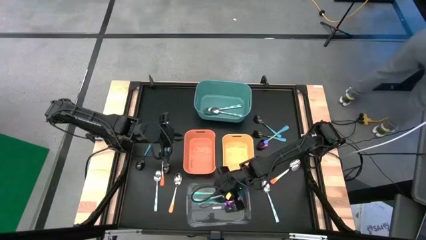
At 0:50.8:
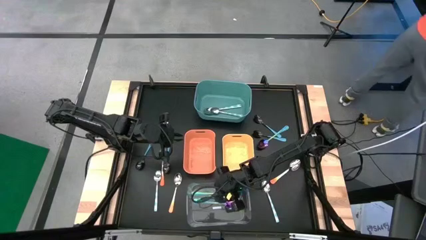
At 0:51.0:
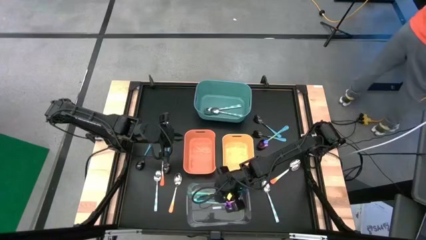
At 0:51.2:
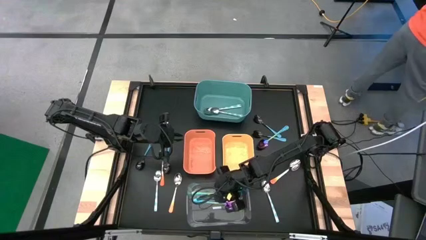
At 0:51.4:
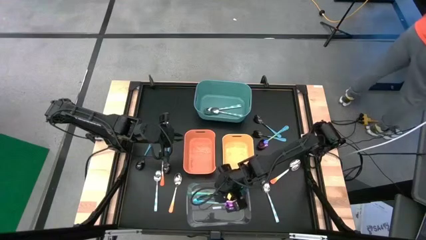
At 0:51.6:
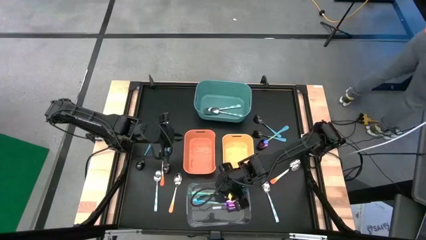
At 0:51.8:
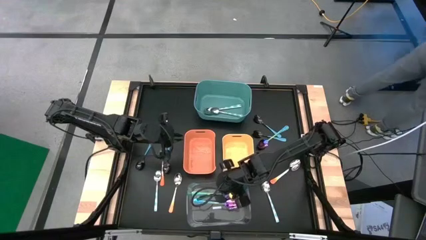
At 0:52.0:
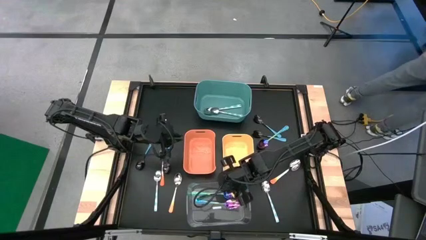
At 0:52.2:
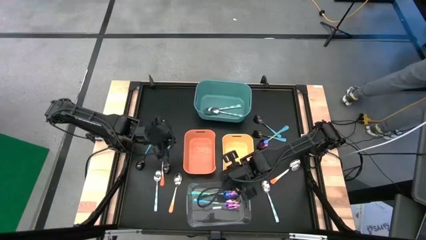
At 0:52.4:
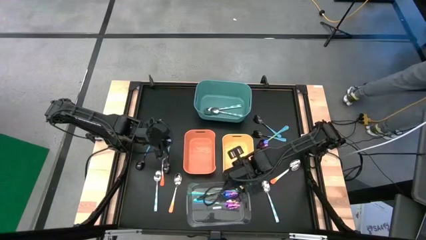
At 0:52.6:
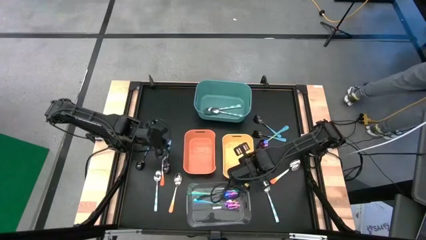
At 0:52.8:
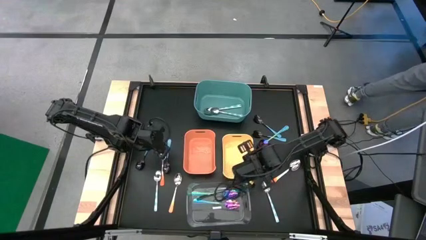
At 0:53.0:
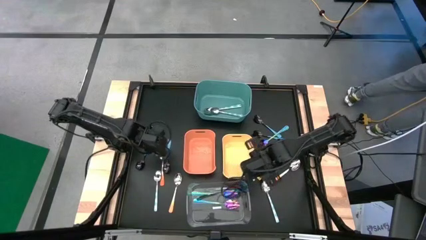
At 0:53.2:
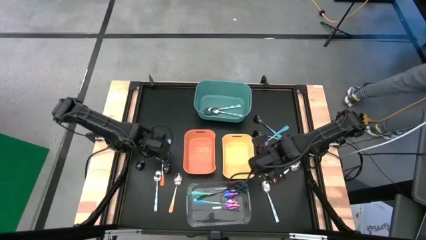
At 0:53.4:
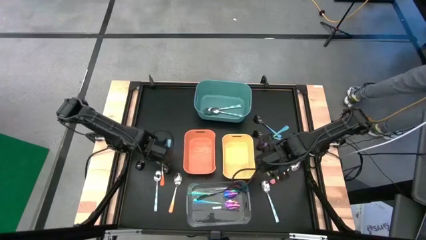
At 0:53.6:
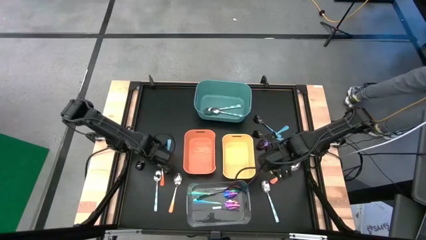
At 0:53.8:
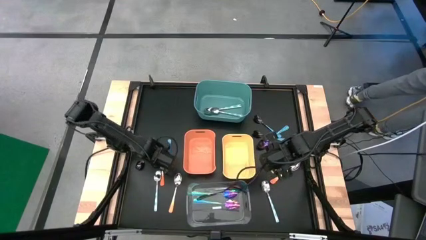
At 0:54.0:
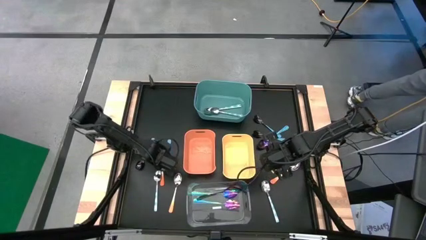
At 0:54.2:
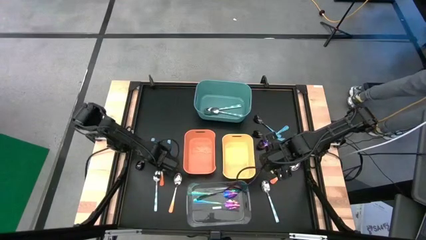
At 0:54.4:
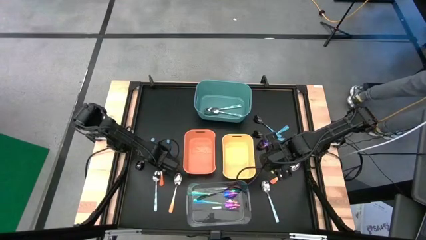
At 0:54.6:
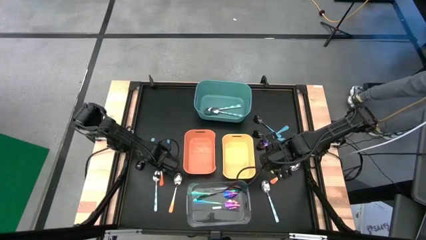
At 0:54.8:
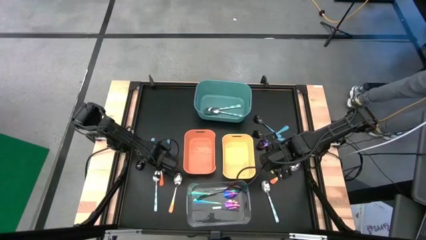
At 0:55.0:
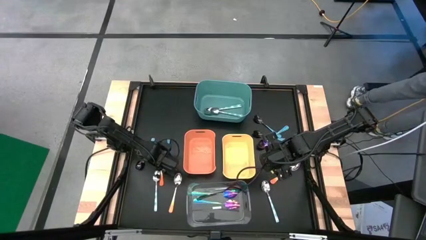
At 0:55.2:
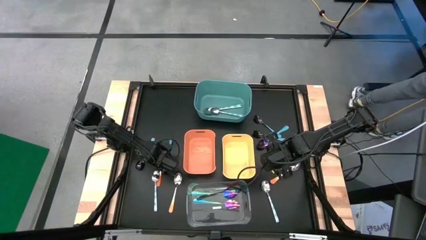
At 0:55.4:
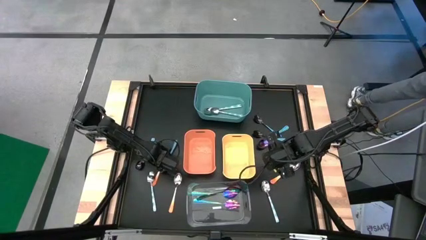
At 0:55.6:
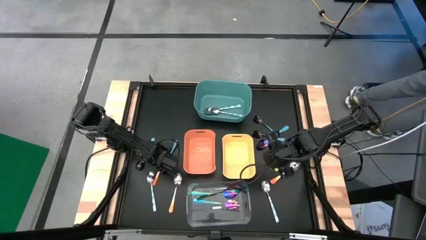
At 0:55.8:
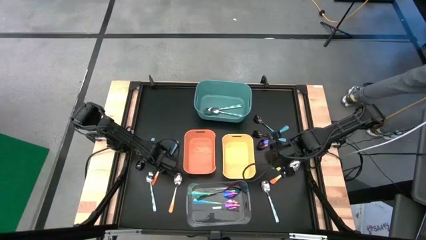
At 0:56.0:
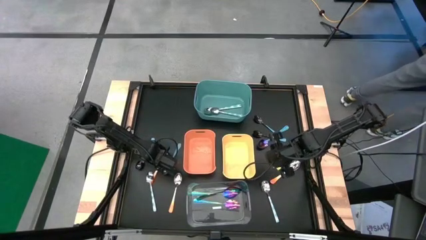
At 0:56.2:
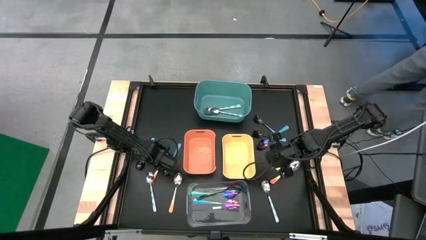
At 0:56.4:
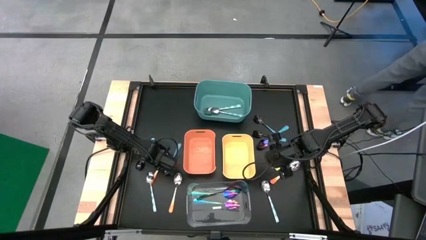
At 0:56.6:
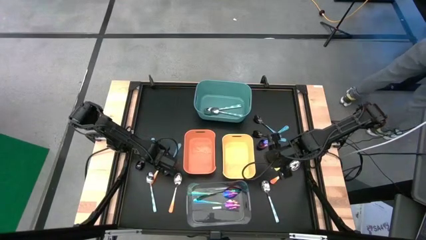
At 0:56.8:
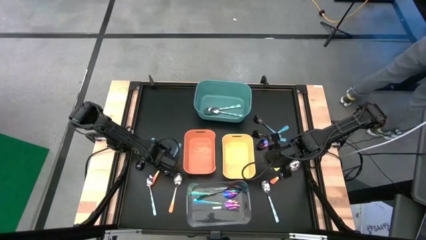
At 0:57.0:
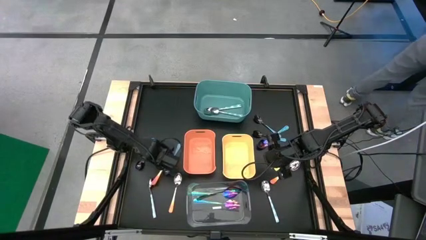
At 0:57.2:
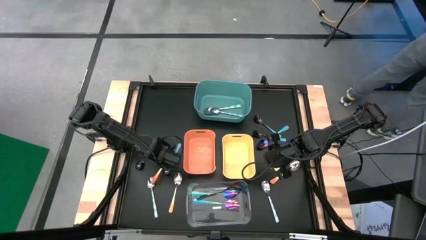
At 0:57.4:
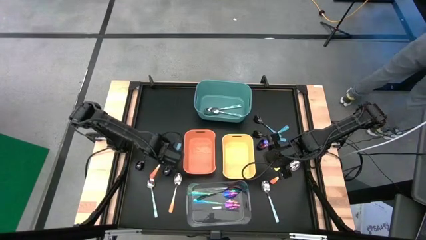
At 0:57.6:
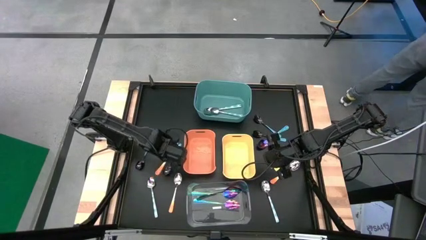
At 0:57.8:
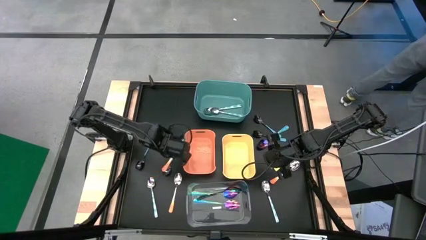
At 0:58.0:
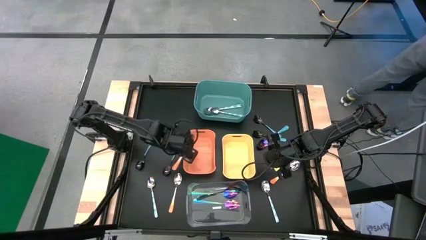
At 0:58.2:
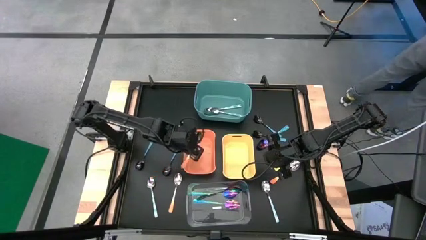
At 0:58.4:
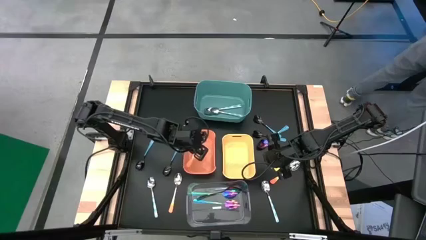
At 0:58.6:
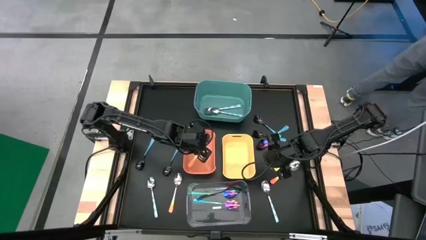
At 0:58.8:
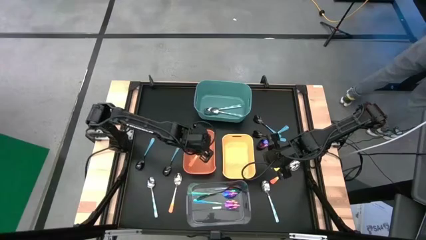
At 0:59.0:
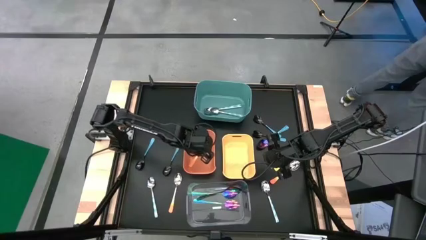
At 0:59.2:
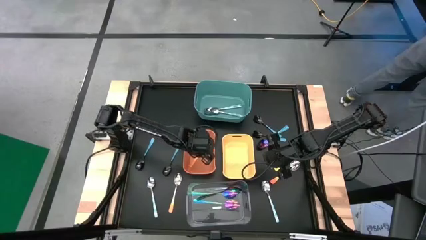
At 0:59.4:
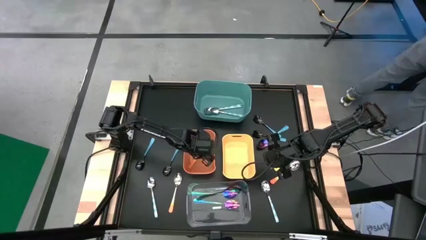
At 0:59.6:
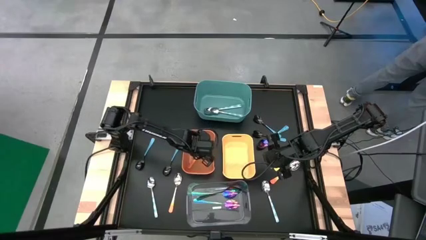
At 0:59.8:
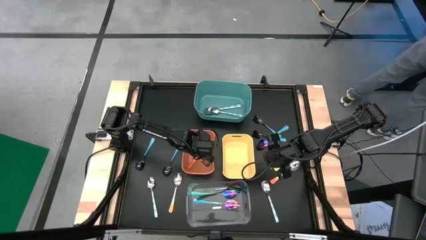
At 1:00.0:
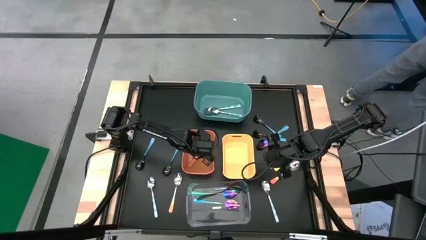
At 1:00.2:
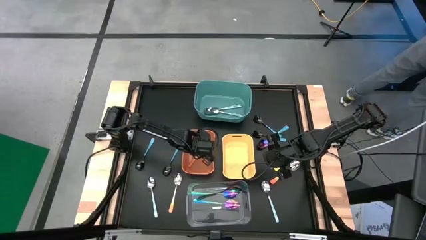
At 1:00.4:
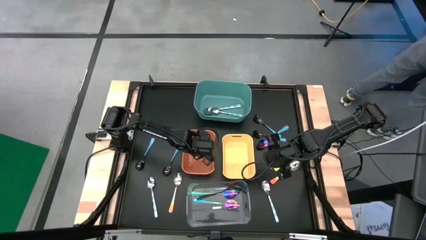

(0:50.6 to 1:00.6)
Task: Sort silverware by color (type)
Put the orange spoon into the orange bin

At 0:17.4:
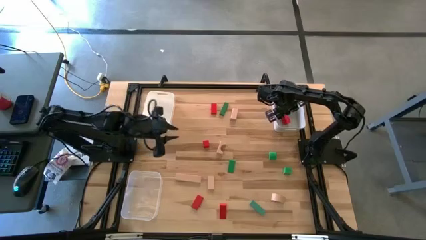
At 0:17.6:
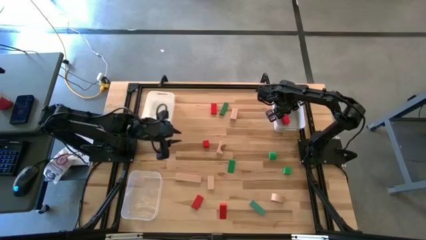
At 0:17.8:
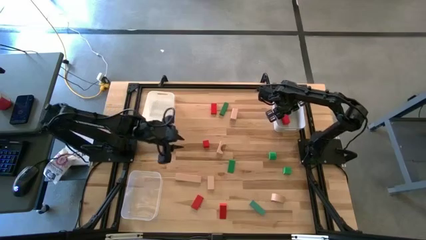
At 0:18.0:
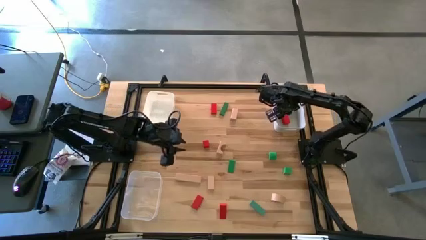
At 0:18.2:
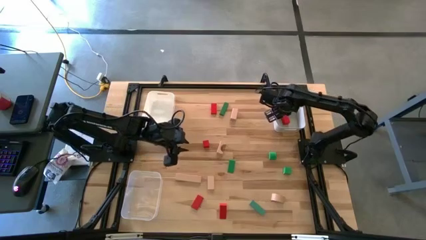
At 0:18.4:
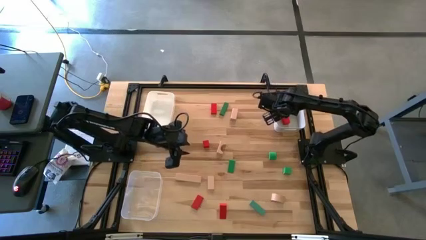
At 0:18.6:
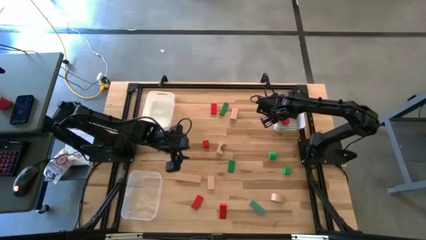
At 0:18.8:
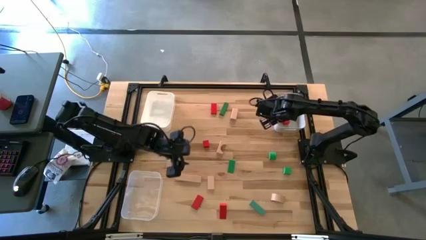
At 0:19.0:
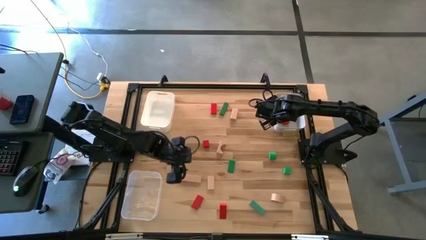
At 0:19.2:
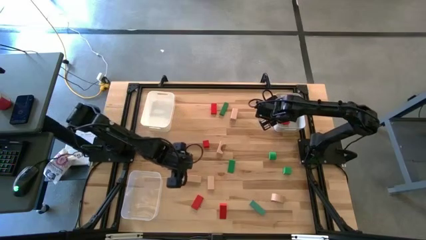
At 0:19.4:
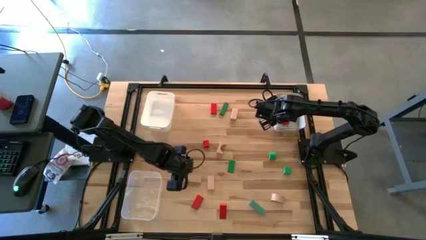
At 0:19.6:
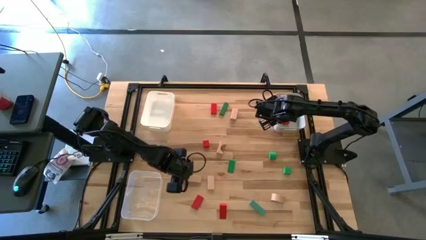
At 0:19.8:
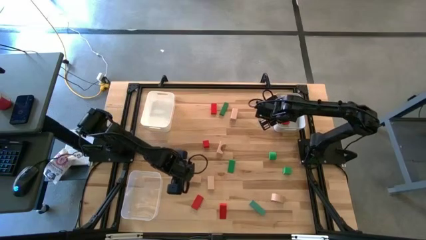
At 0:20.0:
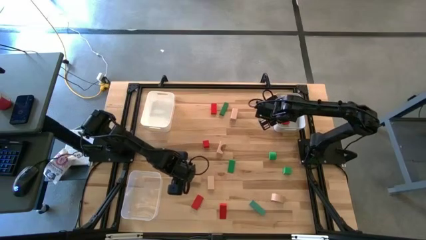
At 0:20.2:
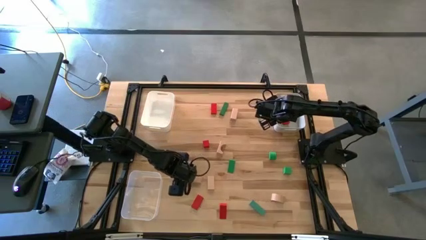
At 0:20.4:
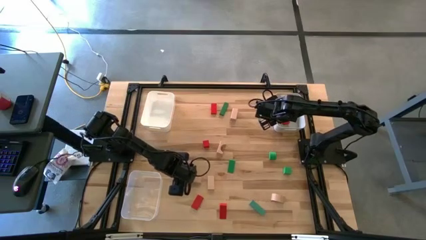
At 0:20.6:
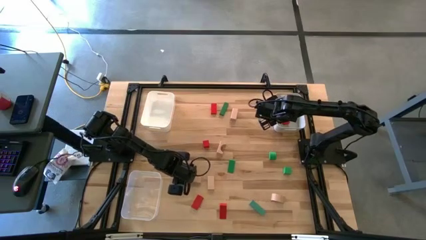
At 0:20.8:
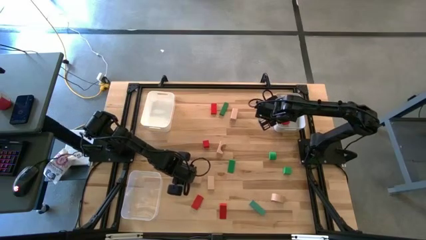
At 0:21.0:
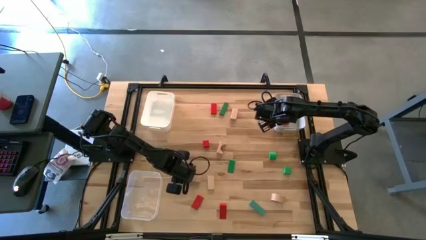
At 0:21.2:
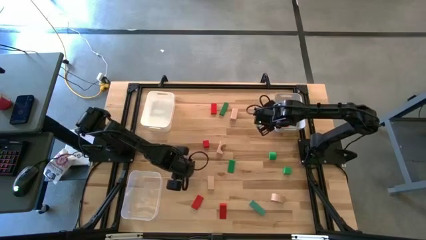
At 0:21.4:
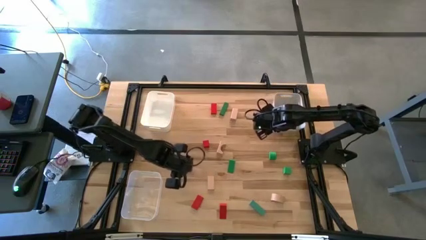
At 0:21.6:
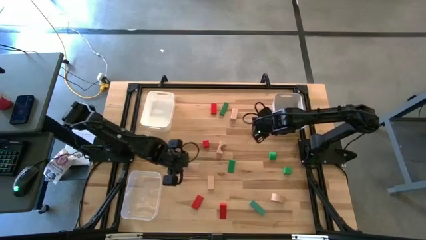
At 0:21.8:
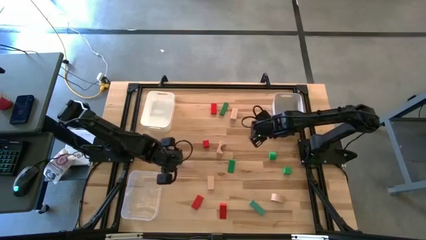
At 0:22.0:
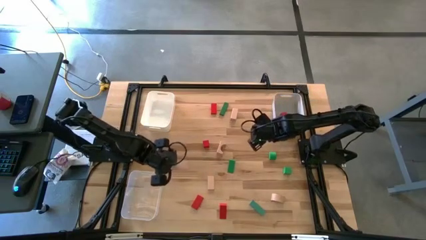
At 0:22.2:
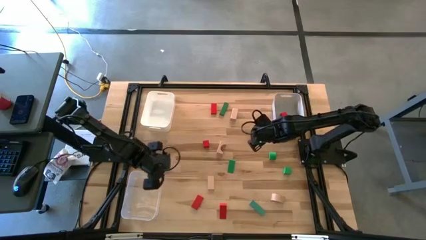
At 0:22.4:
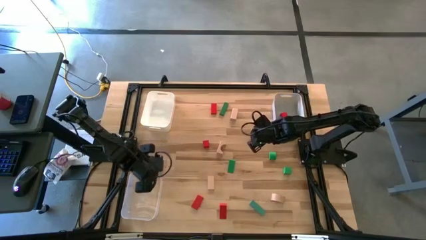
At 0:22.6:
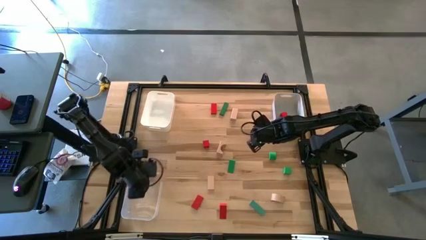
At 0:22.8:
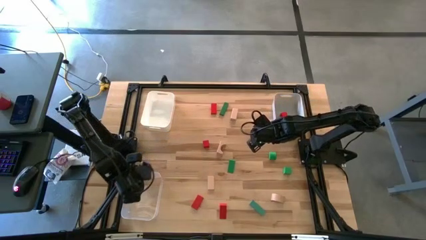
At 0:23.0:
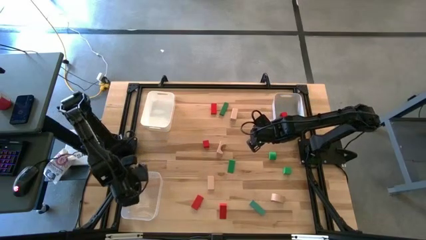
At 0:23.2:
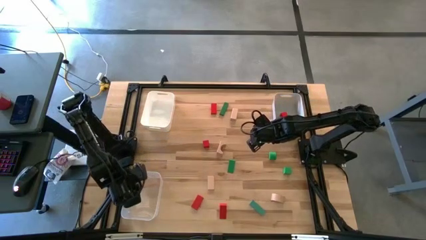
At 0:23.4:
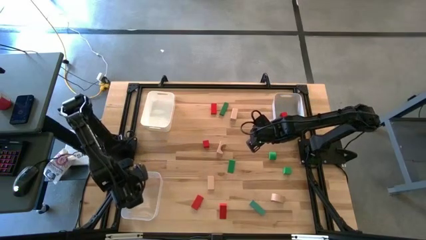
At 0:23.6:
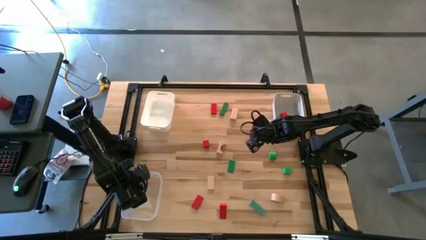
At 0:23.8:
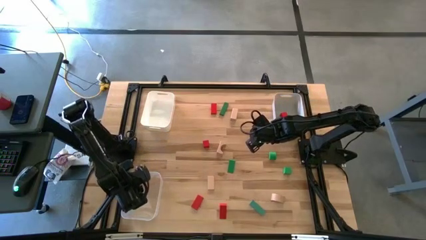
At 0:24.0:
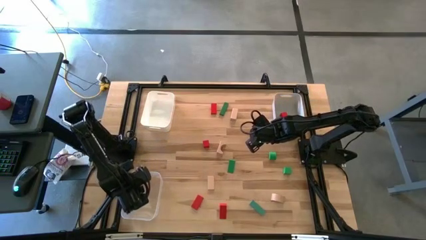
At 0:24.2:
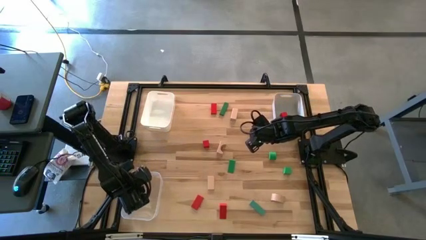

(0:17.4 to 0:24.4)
Task: Sort & place blocks by color
Put the brown block into the transparent bin
